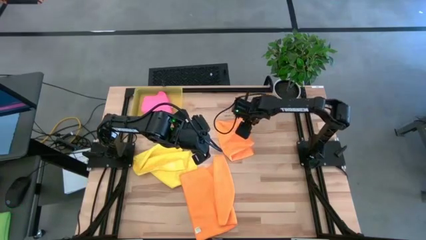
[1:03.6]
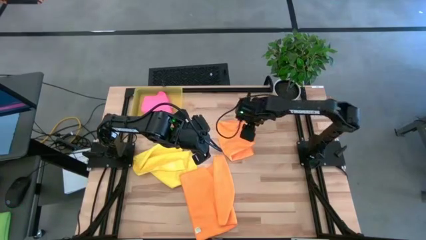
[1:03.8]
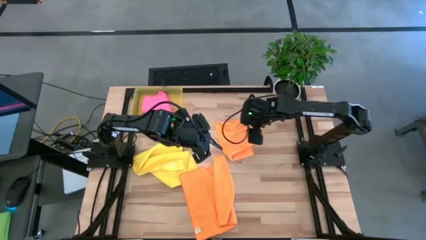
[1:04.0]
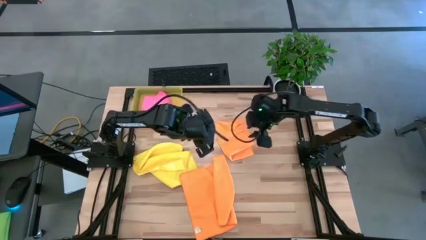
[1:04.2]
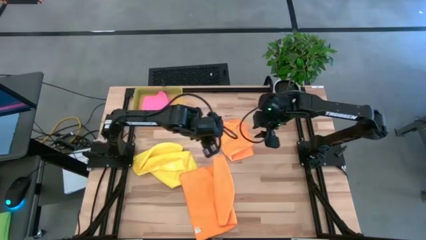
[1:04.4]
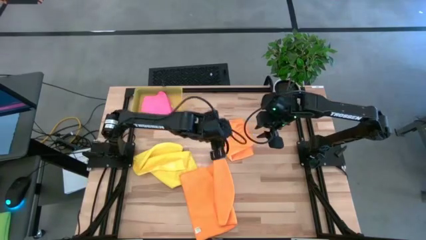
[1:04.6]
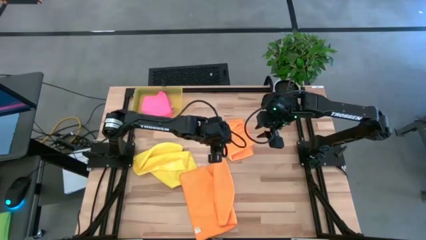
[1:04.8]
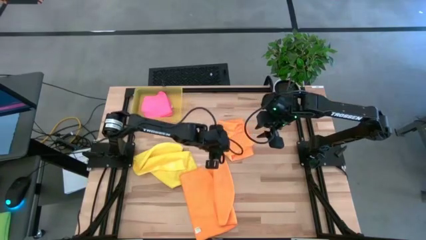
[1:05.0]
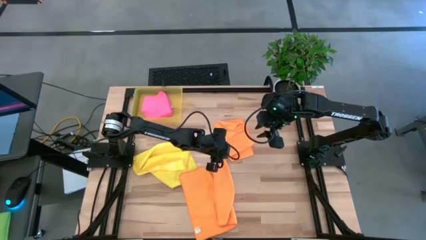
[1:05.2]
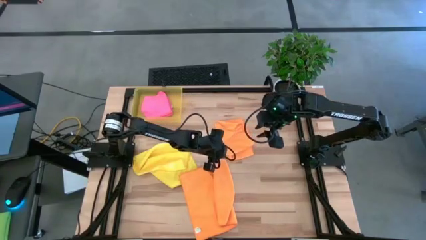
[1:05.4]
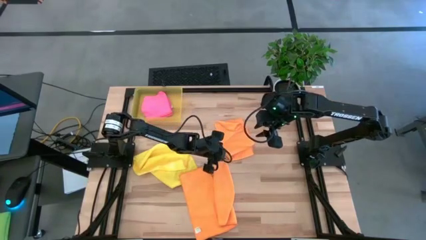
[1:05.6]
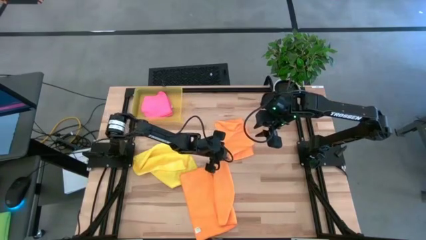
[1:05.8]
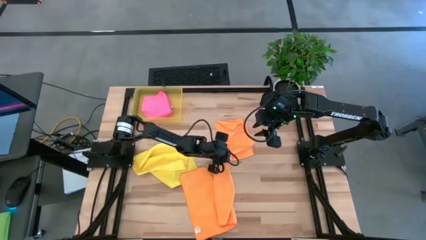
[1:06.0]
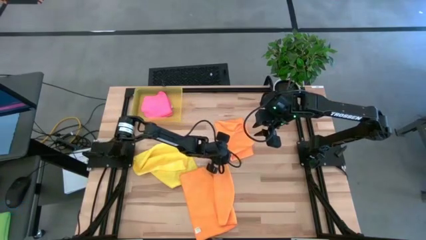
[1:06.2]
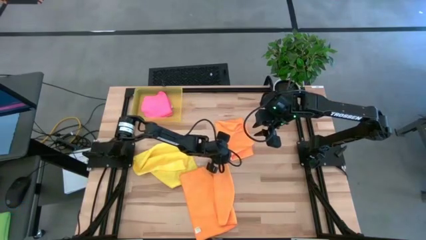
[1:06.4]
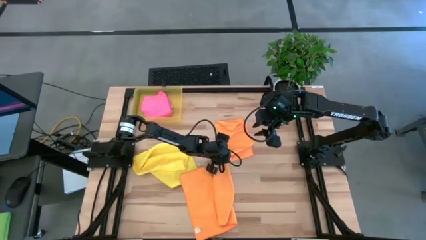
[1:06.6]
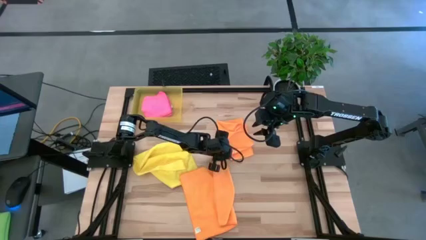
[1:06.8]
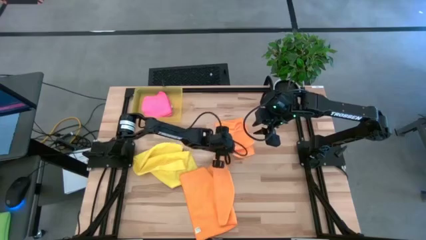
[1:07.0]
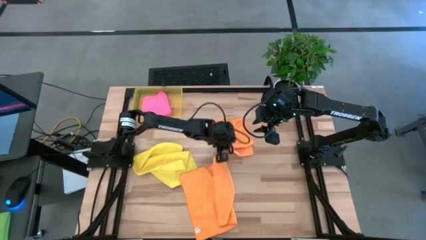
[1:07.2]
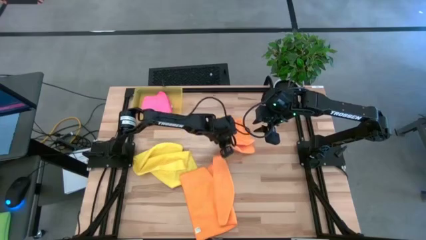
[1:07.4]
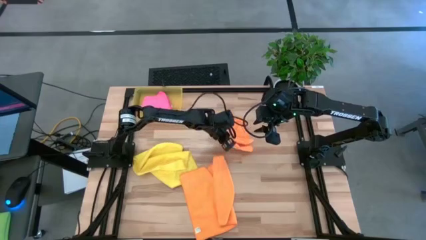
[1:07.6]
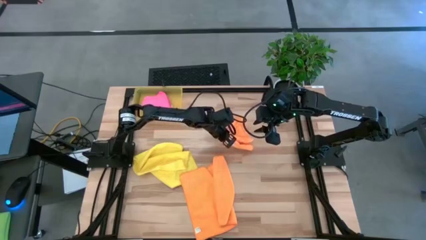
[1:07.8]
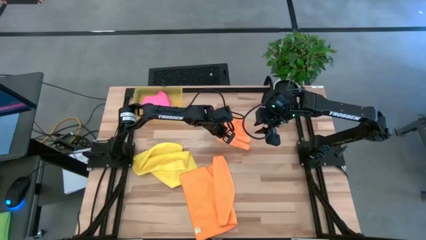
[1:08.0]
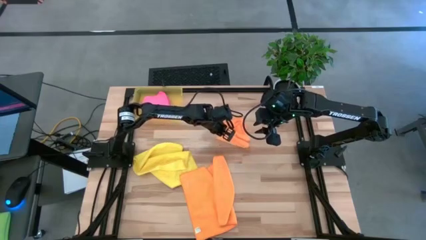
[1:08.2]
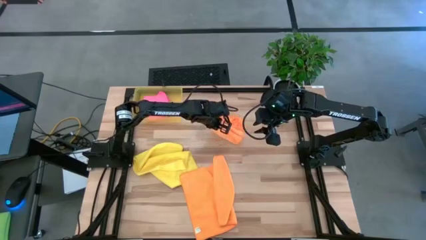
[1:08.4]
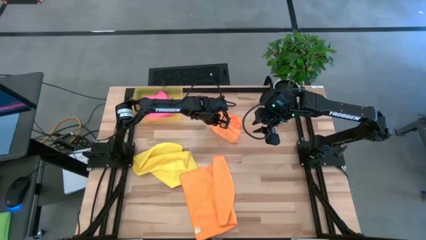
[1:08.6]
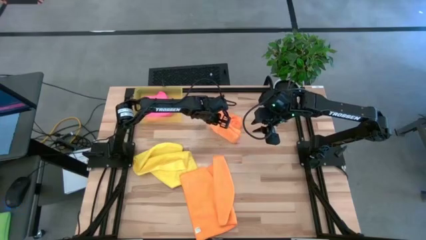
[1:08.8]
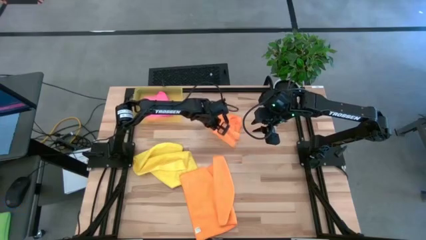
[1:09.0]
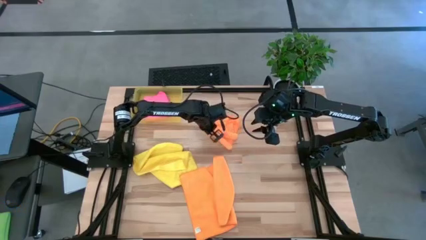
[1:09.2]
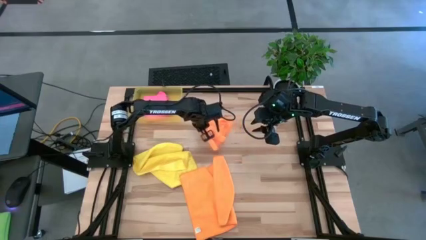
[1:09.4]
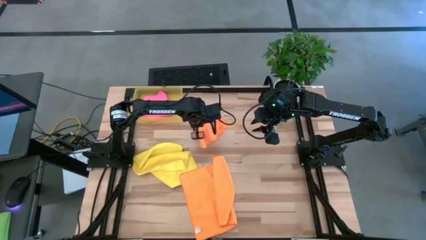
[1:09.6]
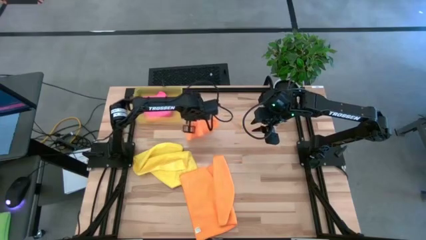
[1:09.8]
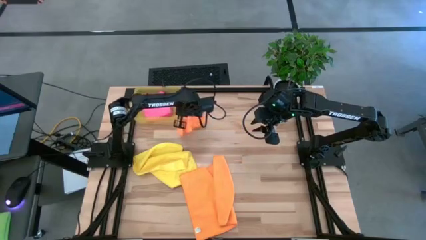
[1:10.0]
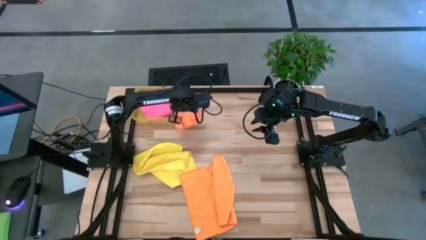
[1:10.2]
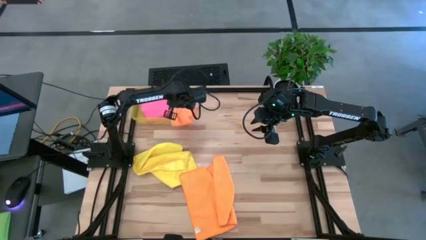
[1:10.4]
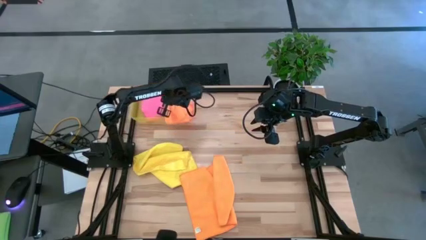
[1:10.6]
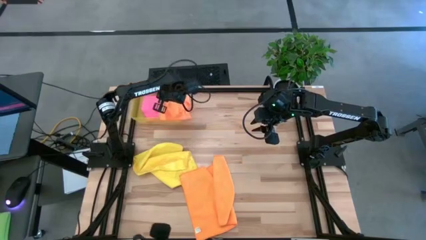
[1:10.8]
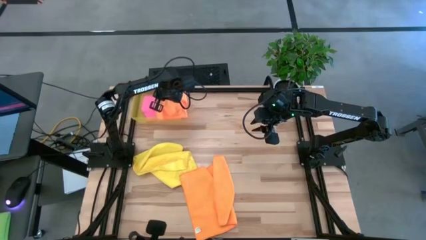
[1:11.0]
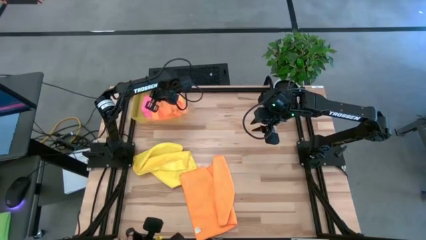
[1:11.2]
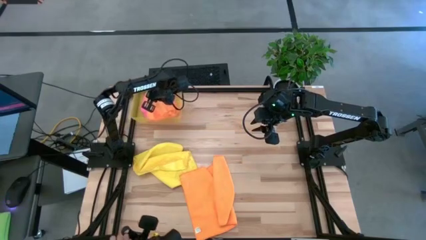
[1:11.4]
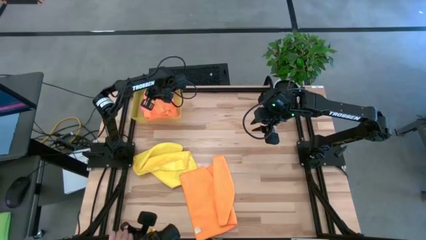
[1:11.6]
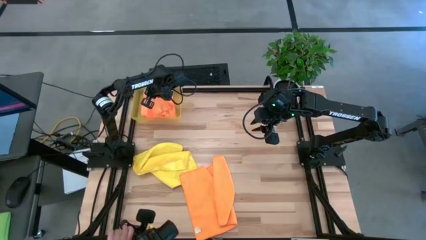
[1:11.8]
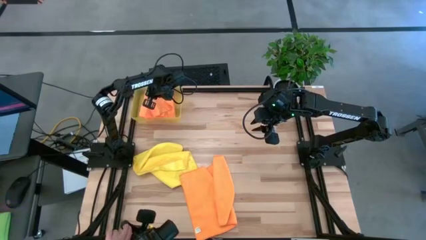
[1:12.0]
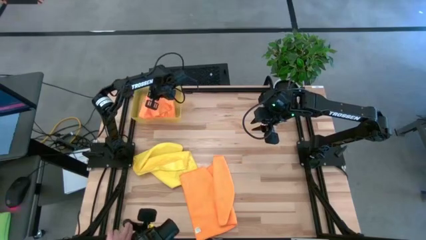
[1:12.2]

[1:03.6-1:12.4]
Task: Fold microfiber towels
Put the top folded orange microfiber cloth into the yellow bin

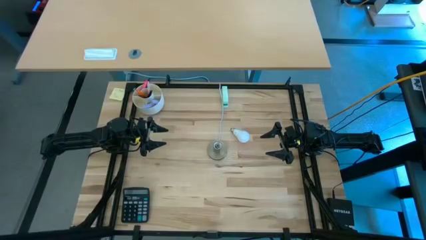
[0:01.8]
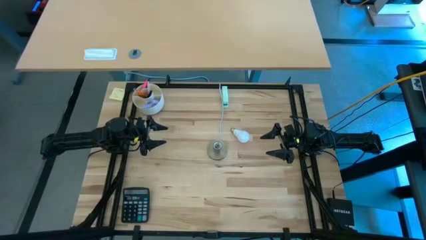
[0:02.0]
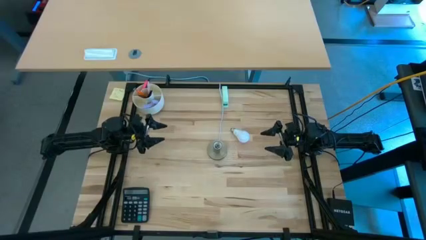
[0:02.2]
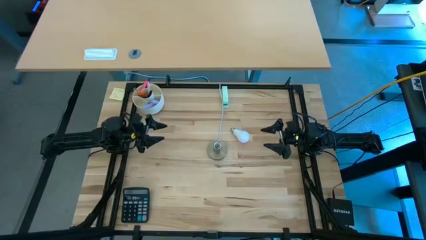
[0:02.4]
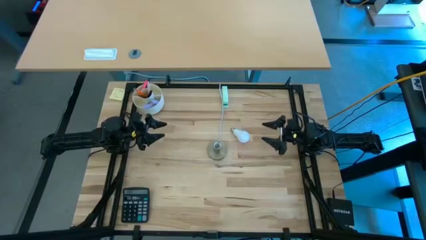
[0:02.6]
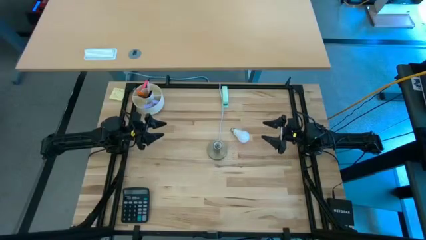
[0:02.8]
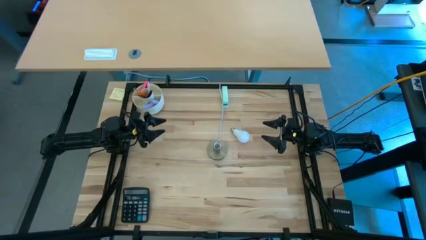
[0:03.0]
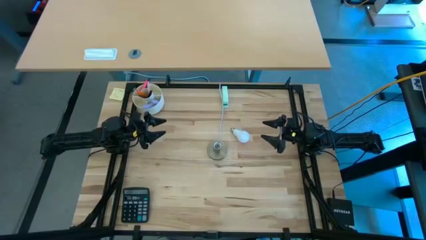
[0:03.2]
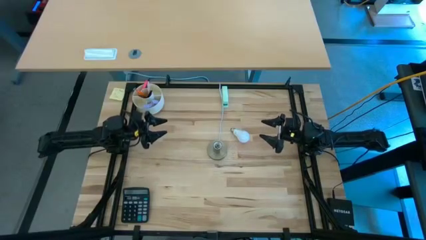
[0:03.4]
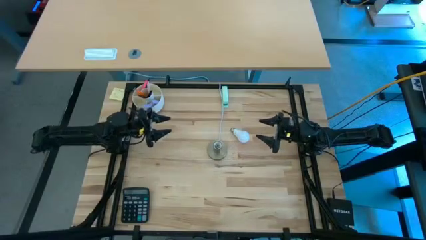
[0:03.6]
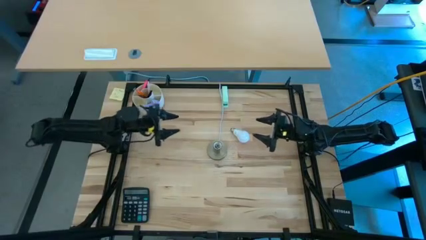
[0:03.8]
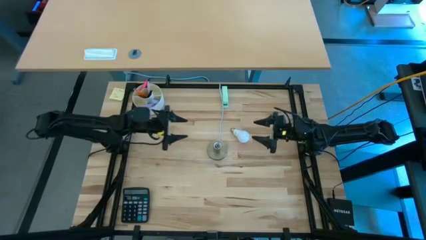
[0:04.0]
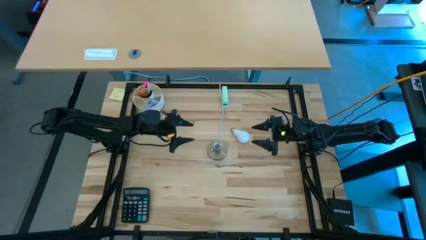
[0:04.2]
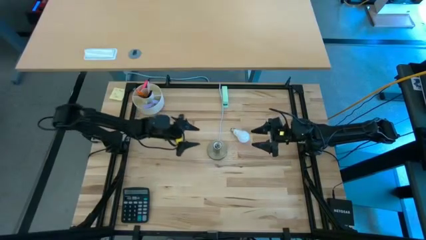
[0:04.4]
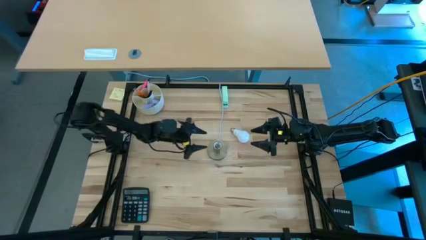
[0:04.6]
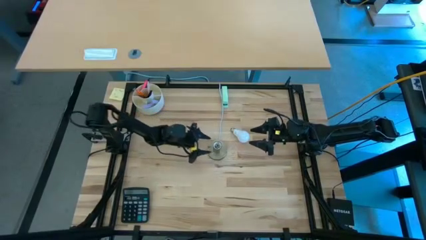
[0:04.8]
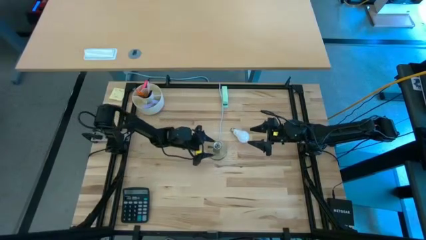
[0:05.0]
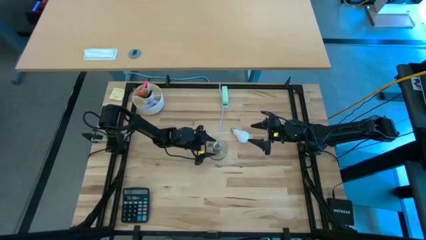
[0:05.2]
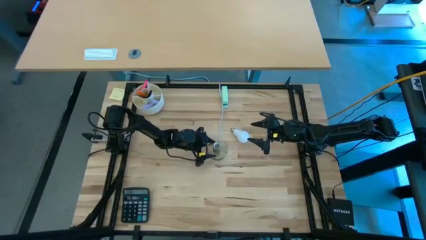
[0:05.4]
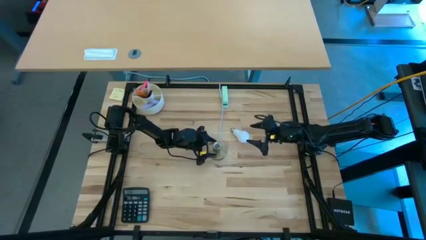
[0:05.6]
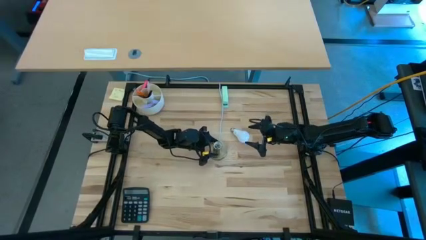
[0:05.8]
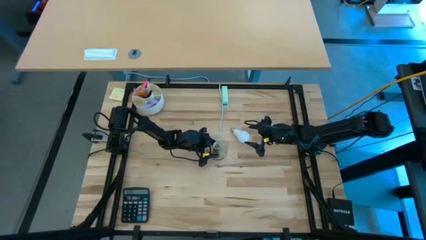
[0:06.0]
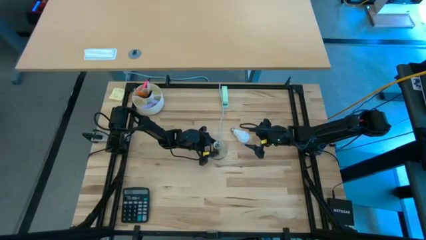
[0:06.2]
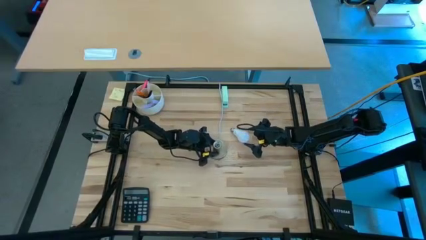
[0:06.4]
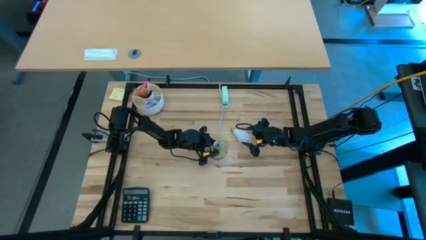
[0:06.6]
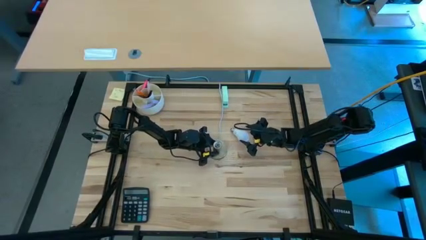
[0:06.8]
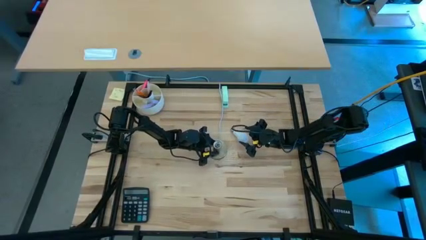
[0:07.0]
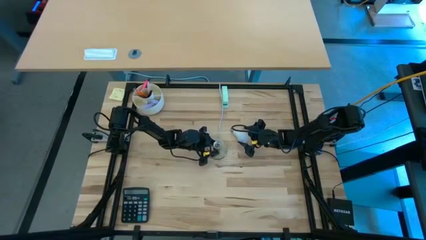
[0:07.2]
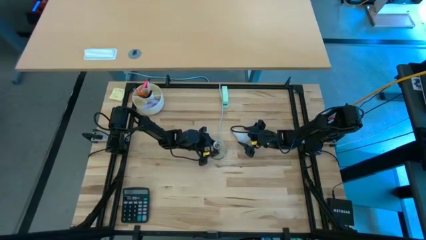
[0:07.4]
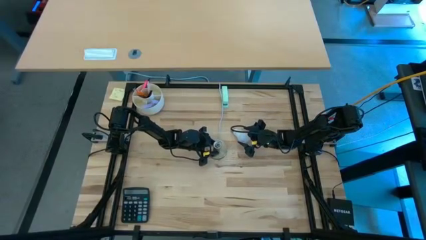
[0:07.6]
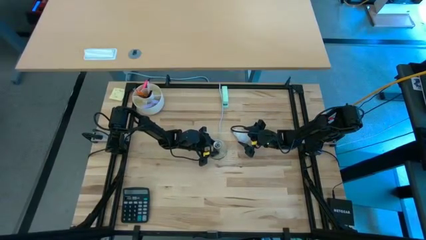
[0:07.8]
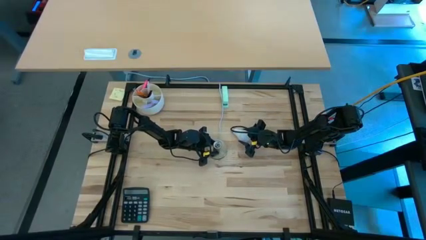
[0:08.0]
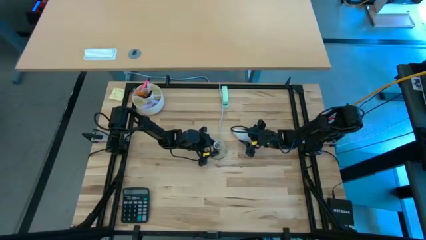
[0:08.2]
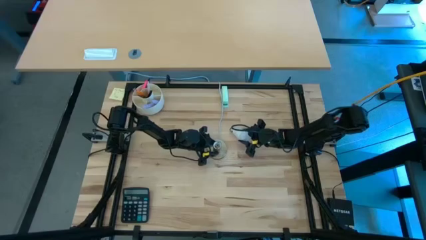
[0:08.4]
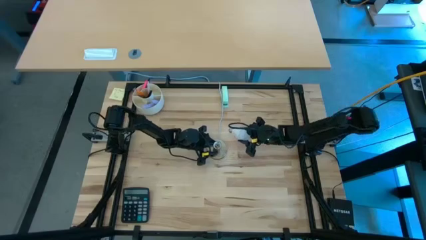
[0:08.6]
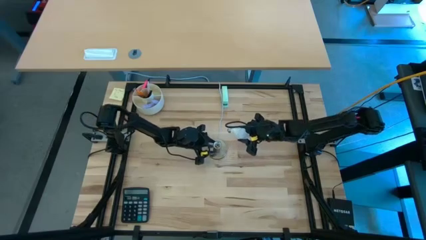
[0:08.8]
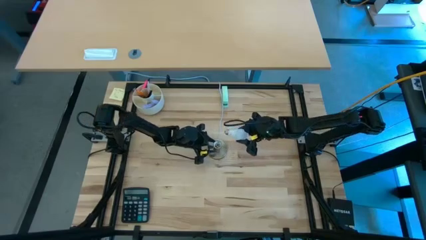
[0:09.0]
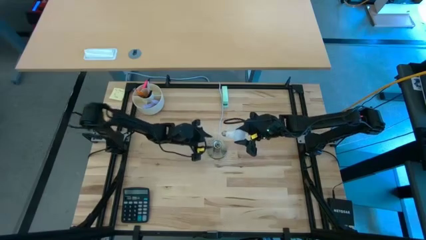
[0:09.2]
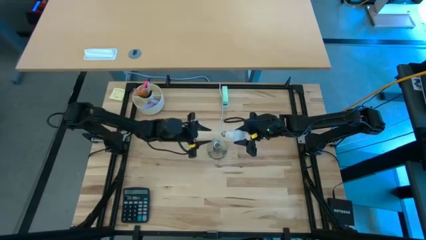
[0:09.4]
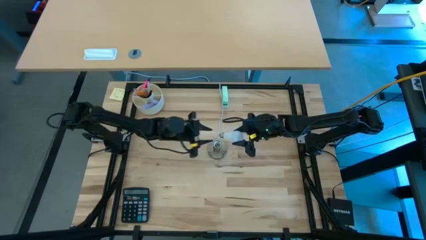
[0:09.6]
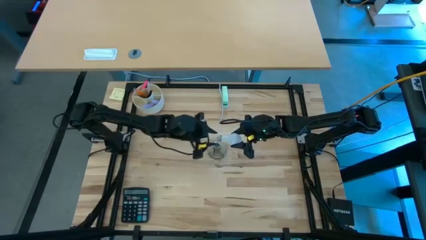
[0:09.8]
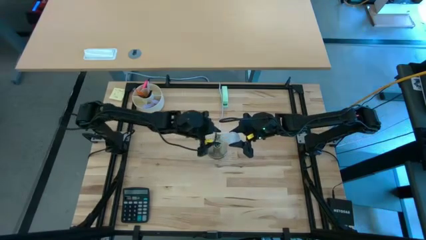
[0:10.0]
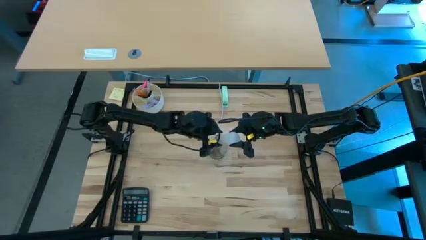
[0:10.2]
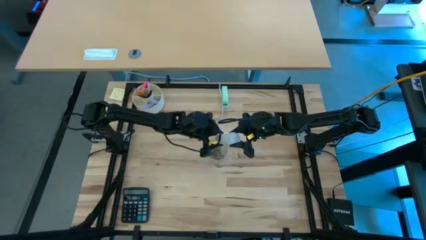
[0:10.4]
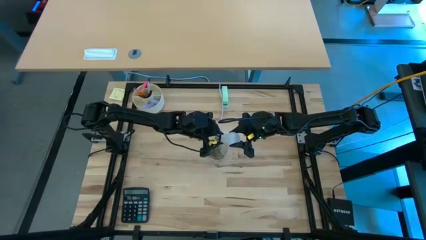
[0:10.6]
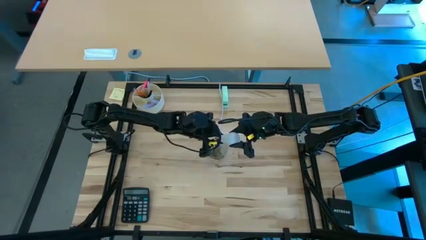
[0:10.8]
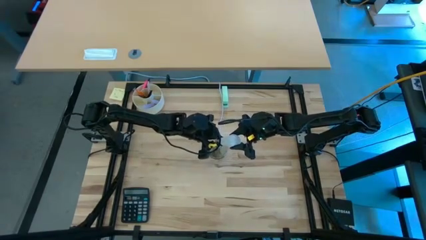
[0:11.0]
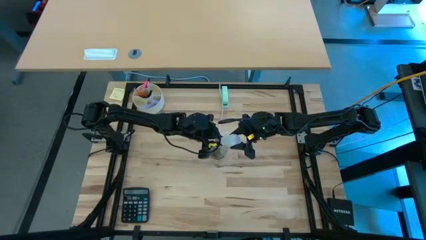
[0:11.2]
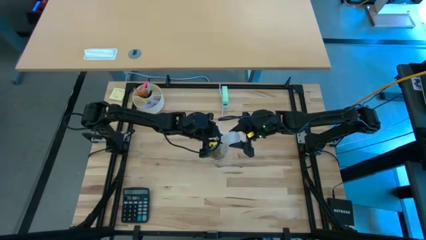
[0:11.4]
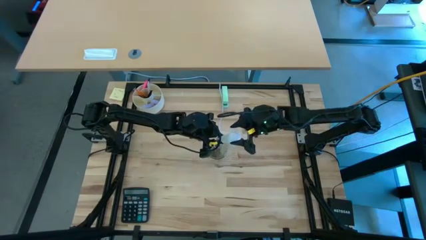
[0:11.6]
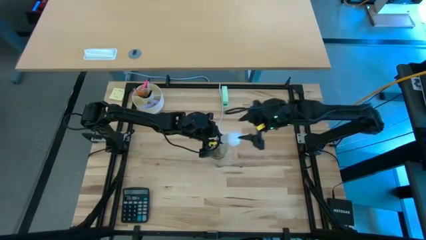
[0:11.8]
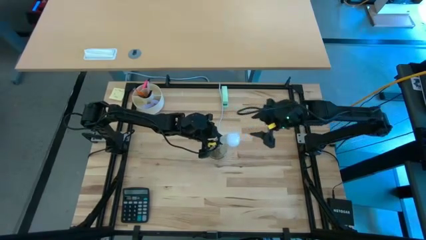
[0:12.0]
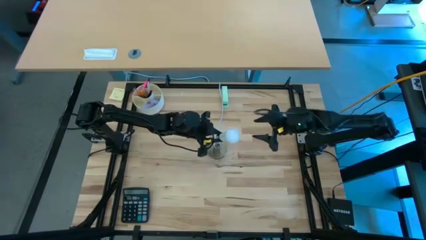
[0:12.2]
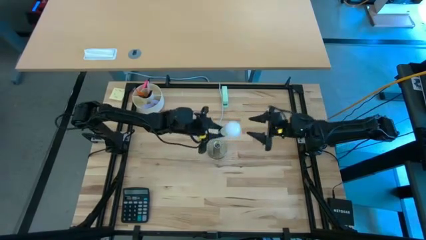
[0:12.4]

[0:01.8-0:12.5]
Task: Screw lightbulb
Insert the lightbulb into the lamp
